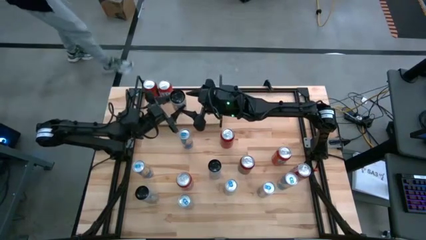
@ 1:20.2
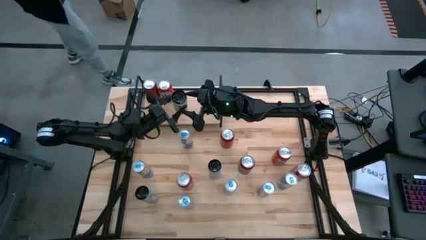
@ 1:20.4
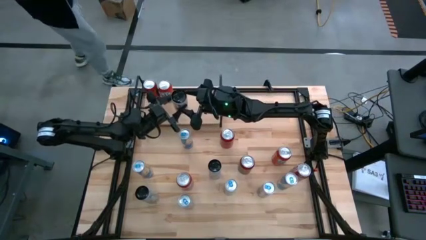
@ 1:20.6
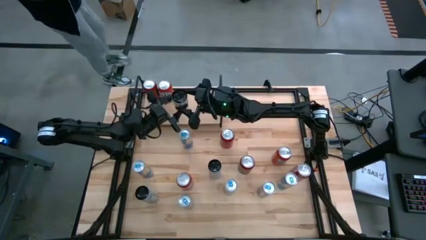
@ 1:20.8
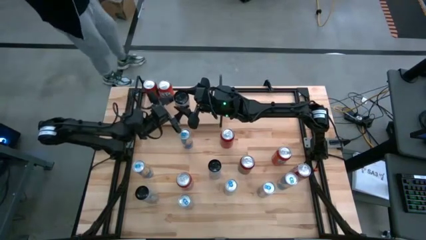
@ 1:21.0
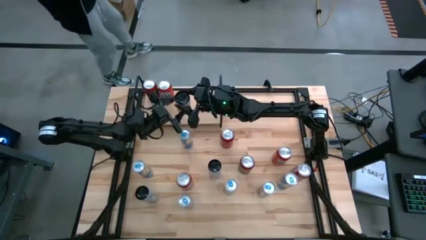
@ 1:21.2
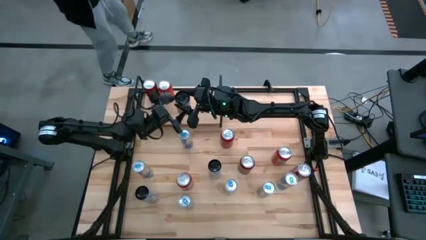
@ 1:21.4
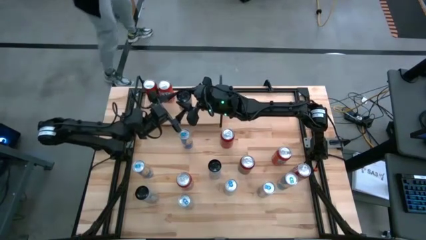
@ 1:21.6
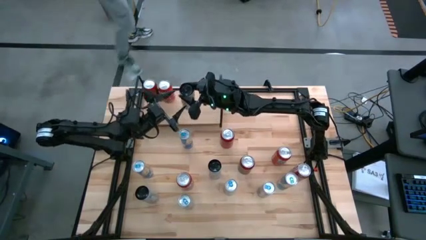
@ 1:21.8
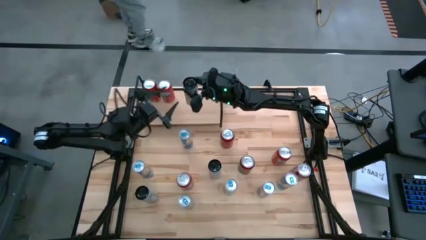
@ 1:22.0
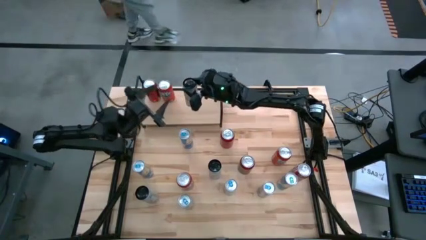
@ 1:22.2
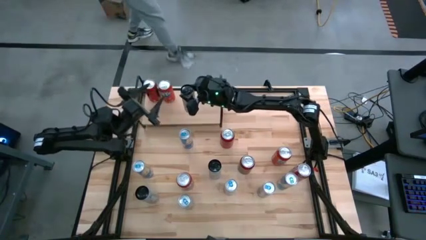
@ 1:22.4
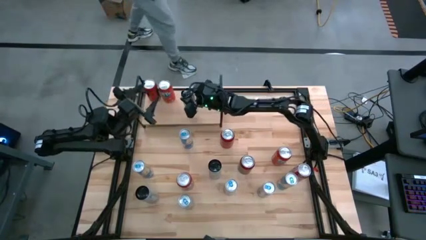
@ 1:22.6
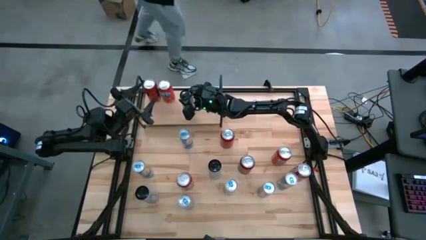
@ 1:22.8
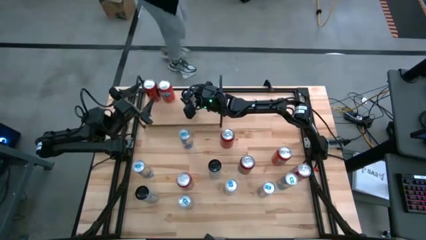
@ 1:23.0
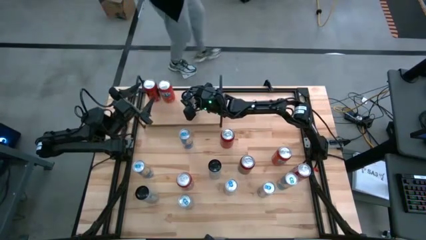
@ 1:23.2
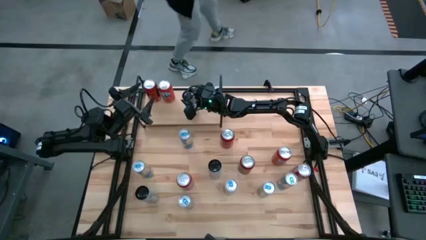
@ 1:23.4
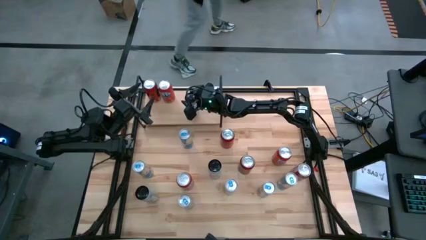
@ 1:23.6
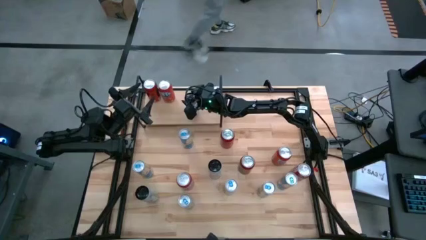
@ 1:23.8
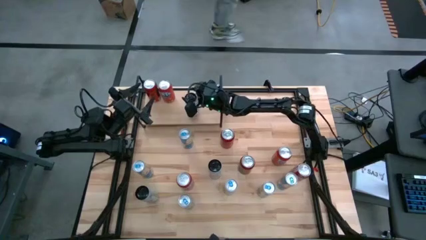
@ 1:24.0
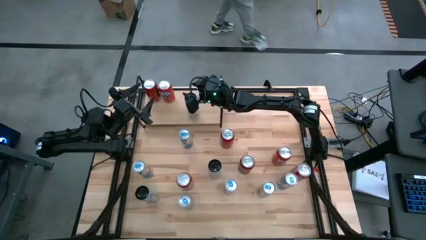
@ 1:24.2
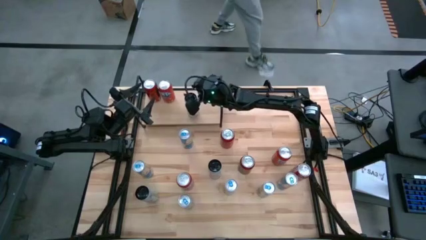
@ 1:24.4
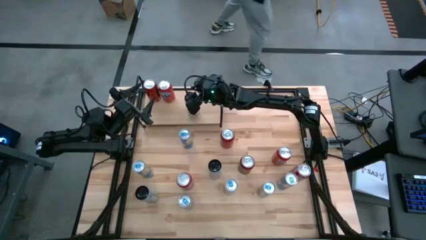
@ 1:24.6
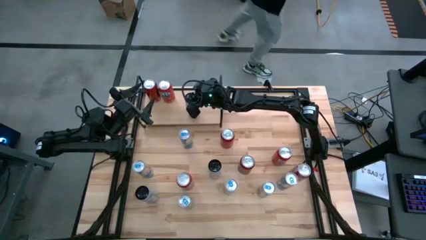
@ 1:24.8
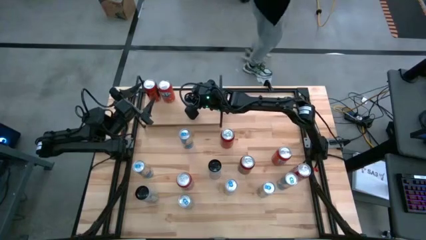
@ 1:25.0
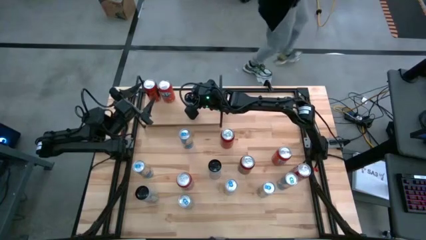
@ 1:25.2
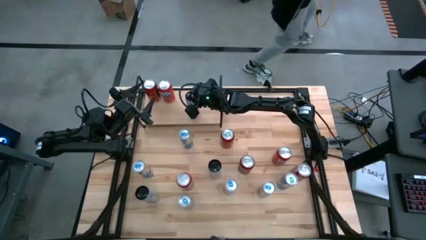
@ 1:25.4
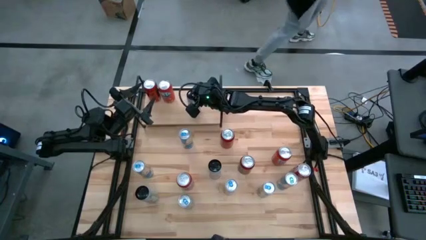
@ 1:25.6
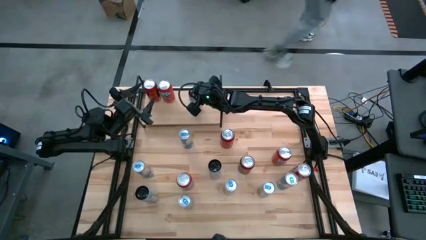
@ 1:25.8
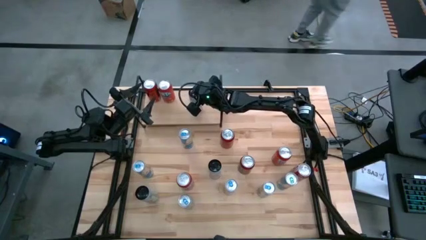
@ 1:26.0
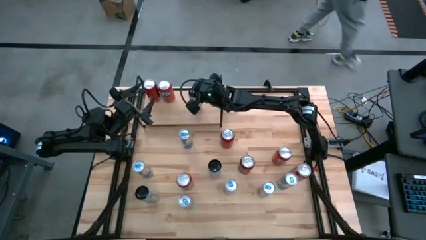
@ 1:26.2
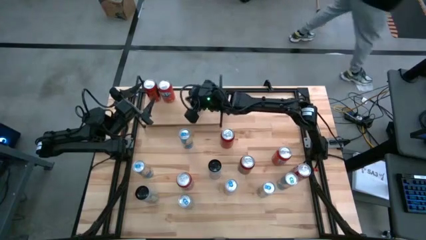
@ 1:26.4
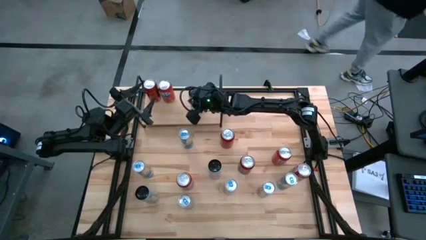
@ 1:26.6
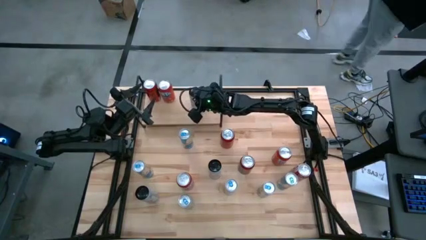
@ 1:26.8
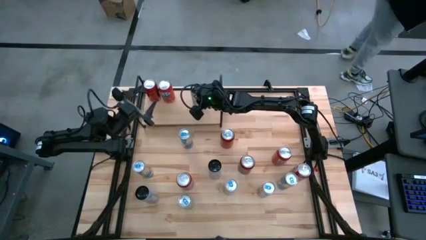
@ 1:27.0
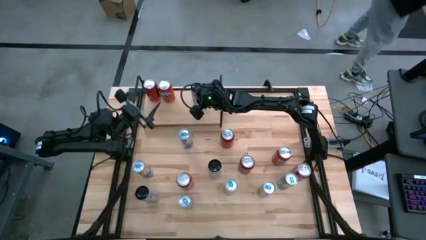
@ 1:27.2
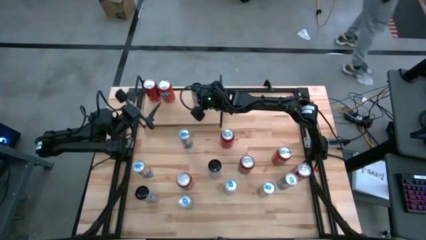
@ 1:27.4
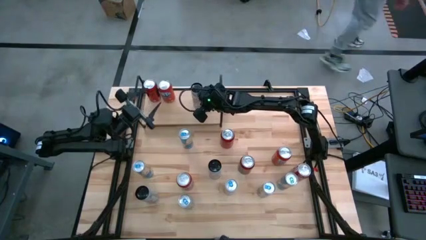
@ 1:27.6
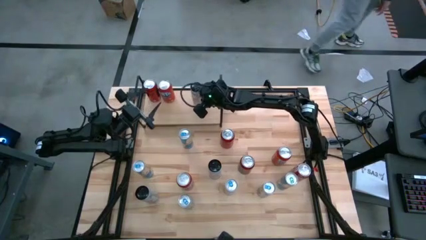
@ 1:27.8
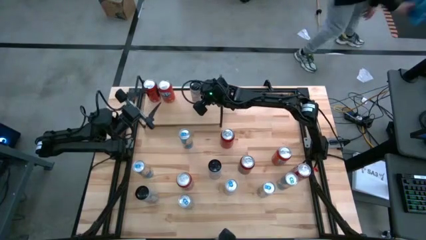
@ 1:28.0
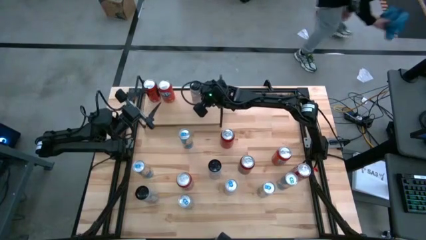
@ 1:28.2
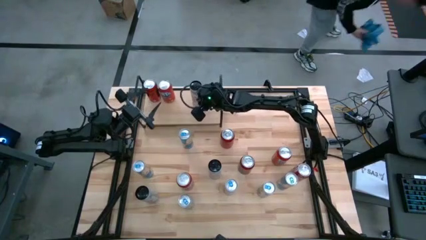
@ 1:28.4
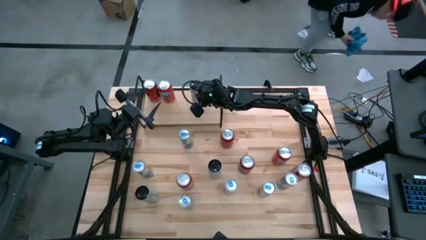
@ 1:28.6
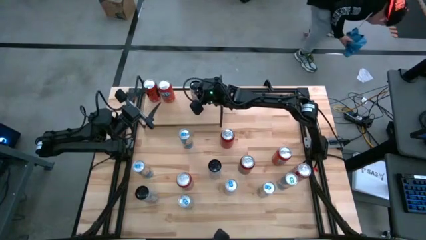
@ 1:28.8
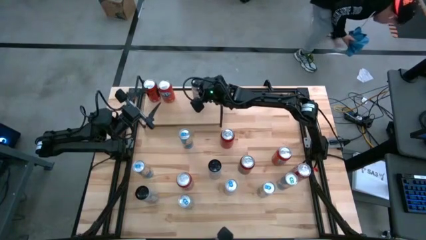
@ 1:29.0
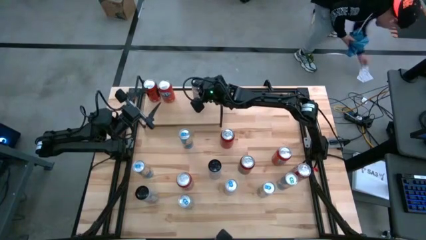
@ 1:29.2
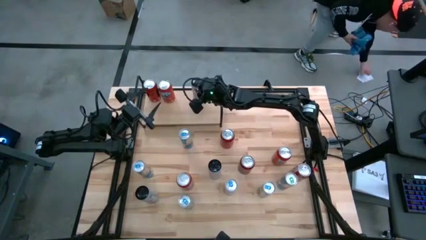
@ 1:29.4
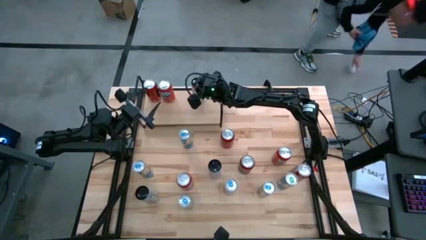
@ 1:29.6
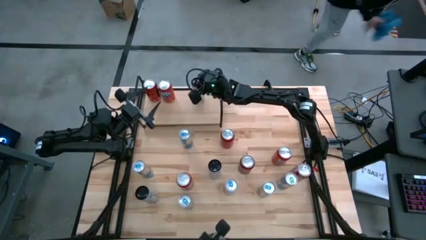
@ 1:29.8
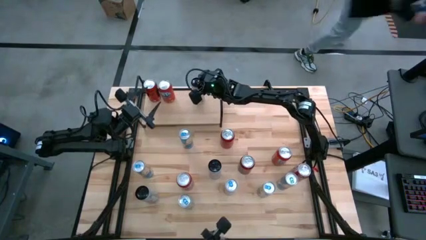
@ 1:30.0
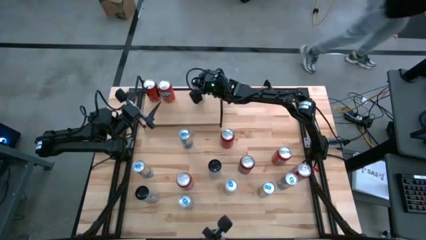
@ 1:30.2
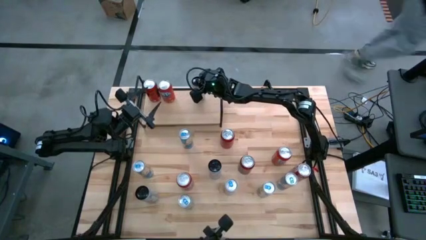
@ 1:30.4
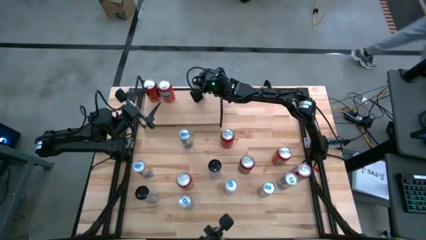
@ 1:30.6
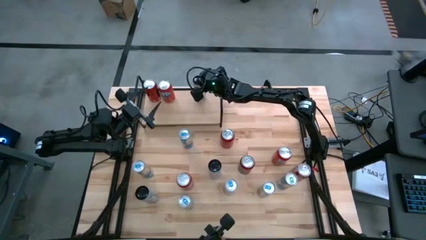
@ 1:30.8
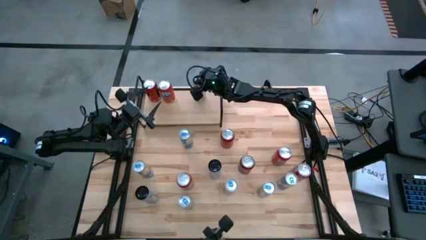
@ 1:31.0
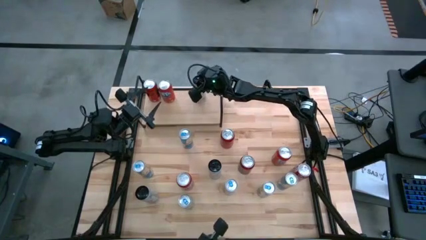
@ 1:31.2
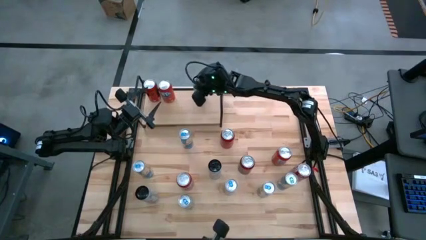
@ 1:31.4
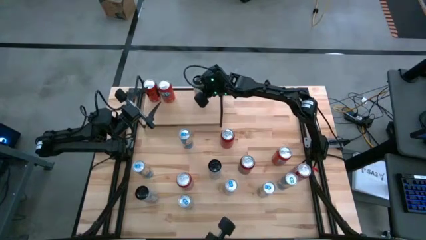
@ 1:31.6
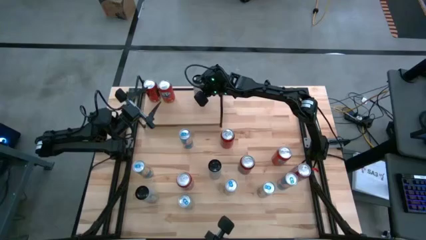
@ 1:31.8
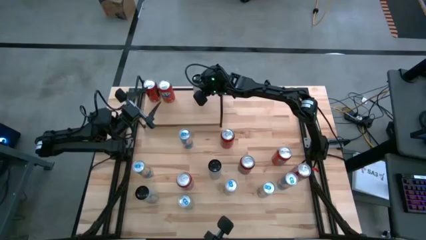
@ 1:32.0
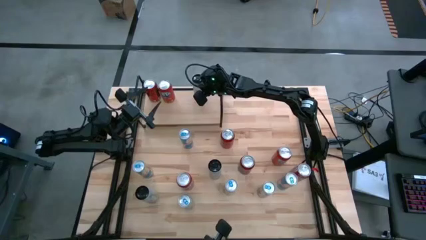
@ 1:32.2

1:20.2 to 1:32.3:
Task: Place canned beverage on shelf
Put the white/pink soda can on the shelf

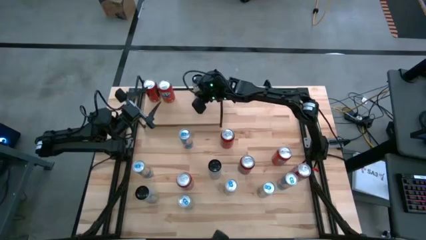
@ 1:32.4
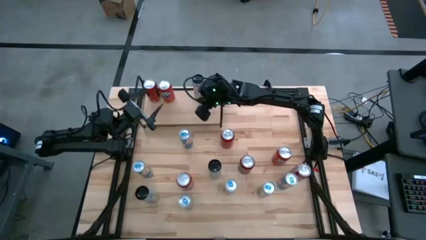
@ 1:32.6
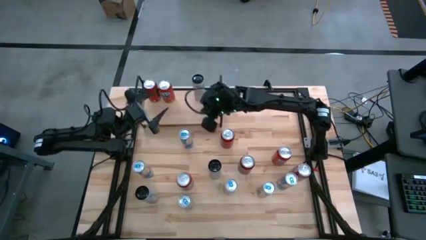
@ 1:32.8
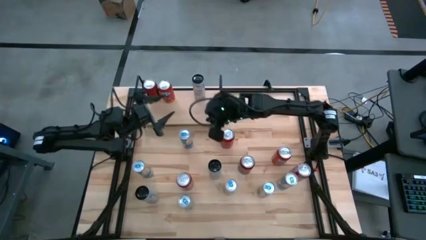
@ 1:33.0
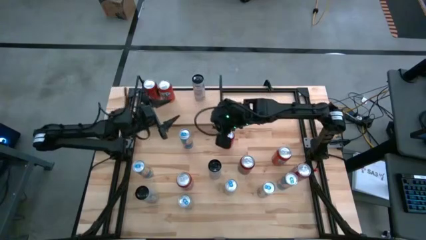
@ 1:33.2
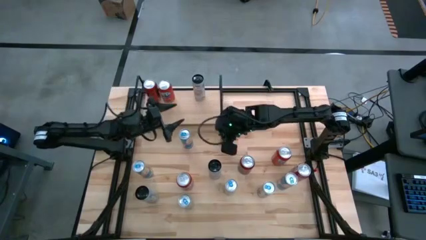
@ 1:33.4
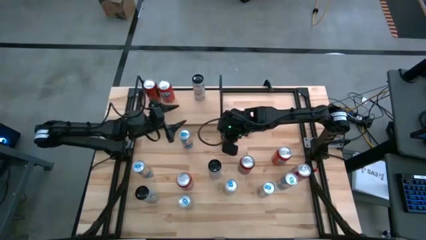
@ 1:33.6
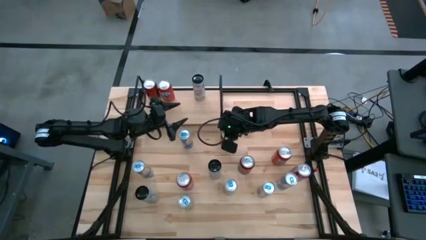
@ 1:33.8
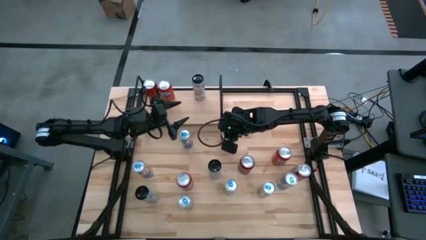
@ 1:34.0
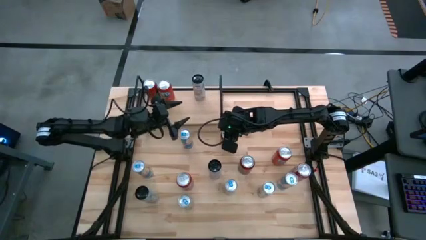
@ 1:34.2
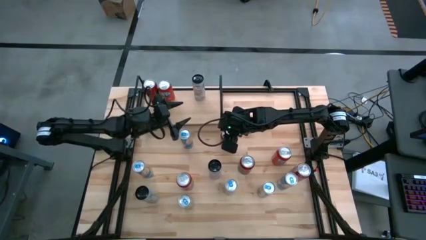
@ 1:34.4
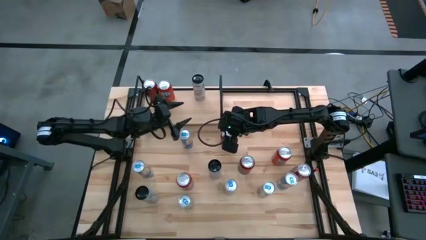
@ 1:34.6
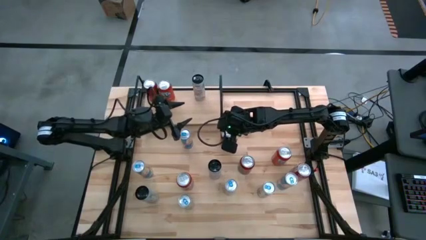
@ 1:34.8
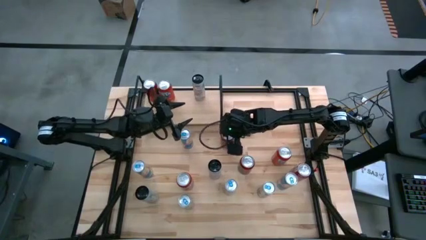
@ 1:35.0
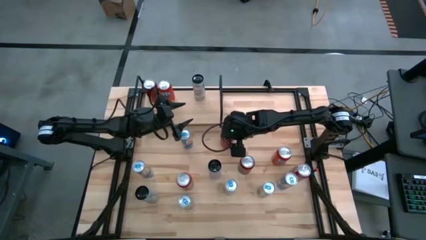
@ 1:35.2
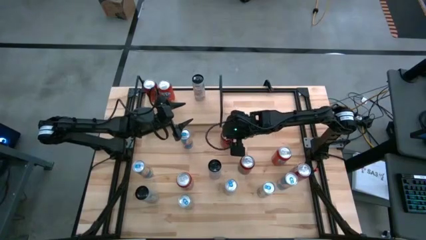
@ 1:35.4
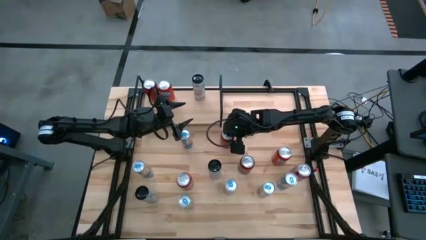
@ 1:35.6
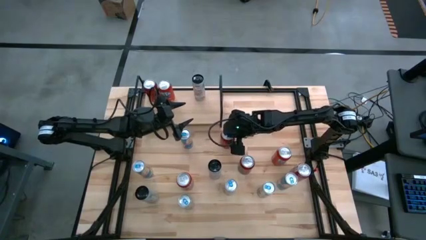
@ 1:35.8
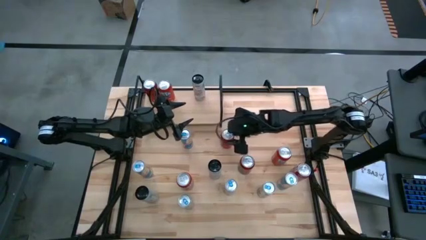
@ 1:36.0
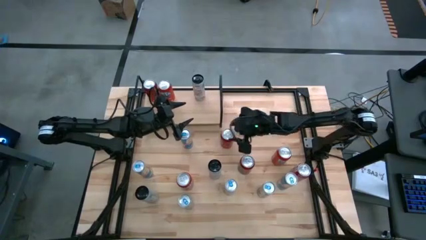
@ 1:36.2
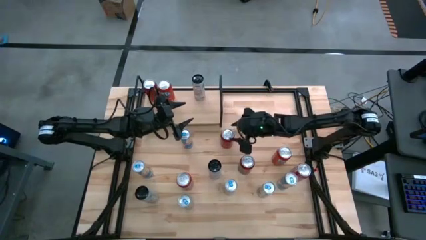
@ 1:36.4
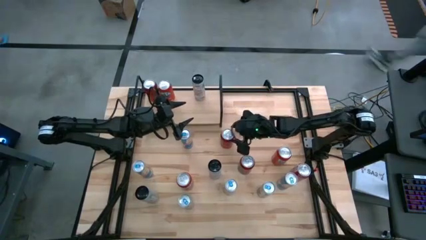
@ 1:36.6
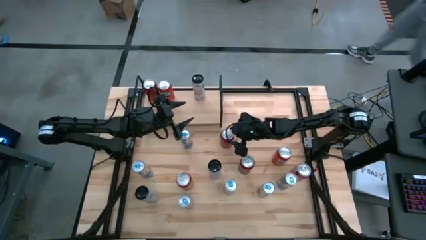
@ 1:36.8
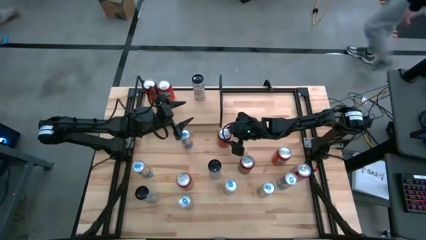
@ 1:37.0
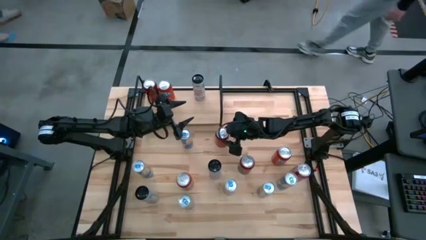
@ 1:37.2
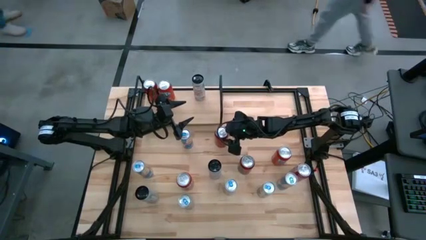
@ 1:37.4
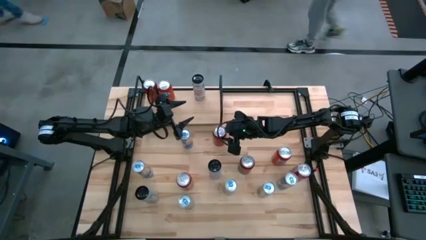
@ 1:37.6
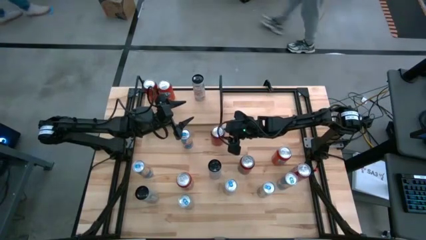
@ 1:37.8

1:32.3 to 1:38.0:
Put the red and black soda can on the shelf aligned with the other red and black soda can
